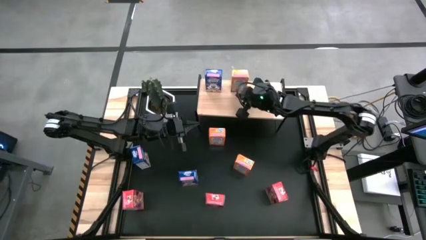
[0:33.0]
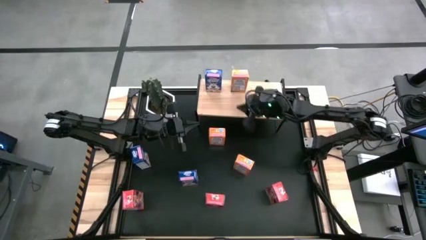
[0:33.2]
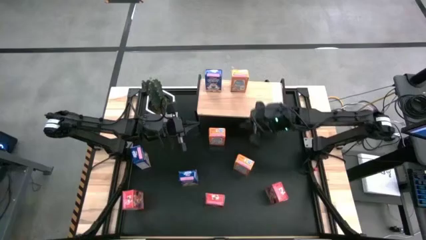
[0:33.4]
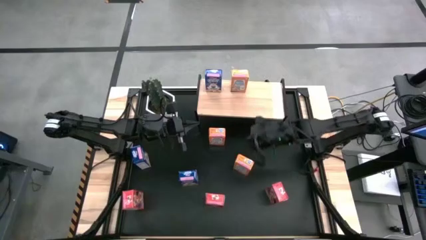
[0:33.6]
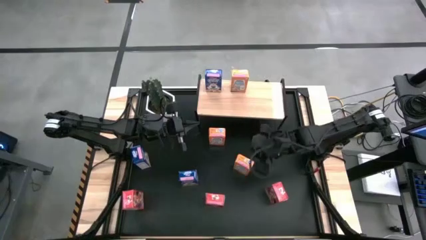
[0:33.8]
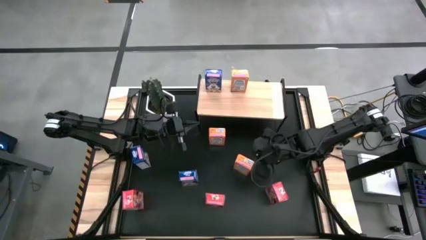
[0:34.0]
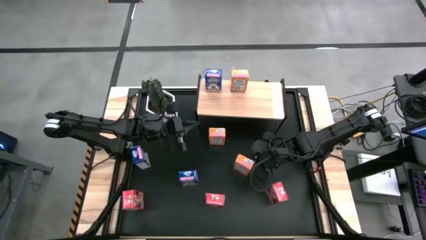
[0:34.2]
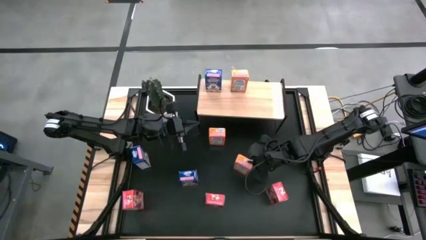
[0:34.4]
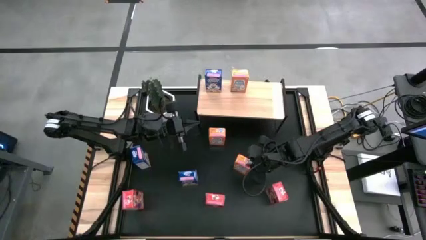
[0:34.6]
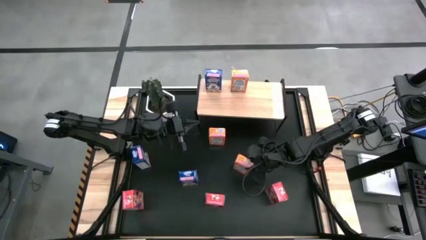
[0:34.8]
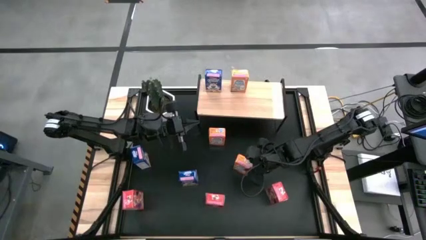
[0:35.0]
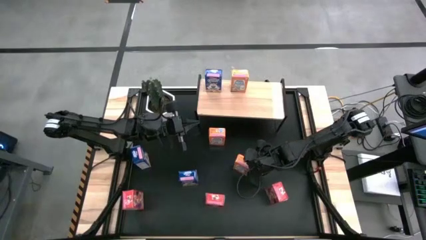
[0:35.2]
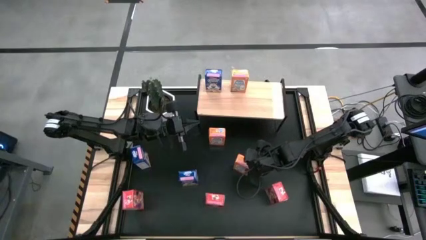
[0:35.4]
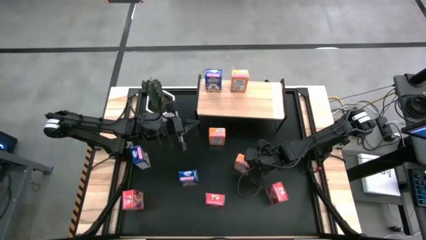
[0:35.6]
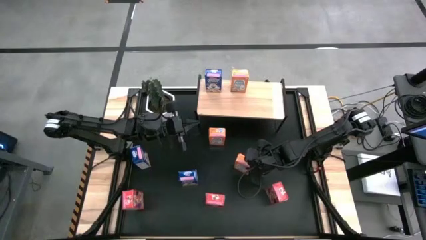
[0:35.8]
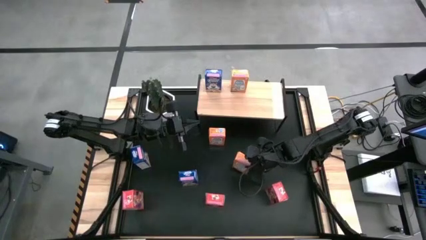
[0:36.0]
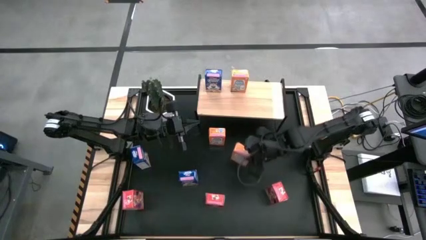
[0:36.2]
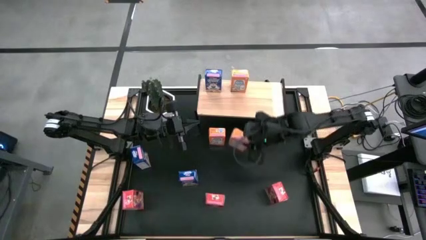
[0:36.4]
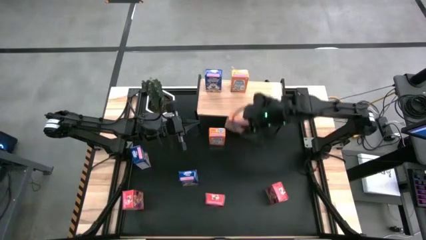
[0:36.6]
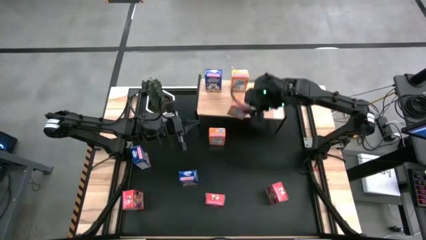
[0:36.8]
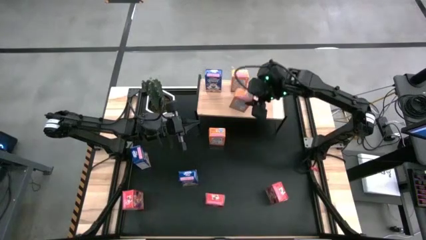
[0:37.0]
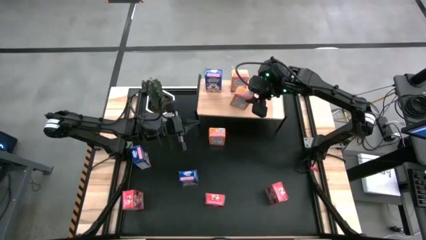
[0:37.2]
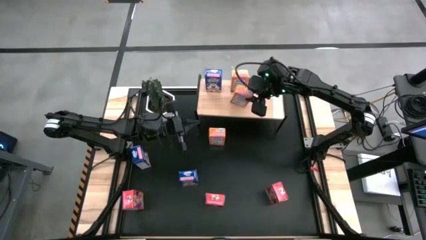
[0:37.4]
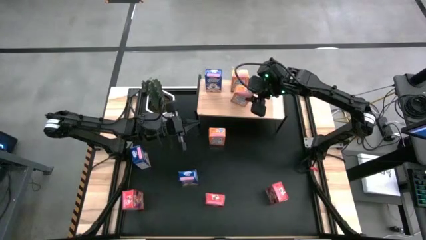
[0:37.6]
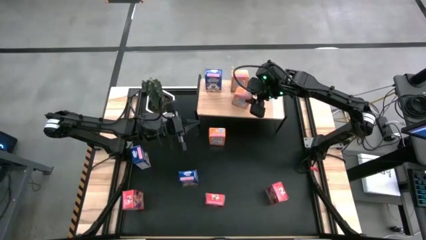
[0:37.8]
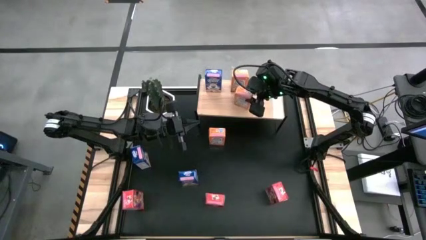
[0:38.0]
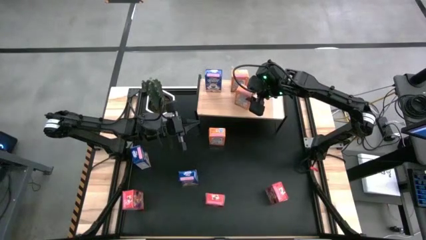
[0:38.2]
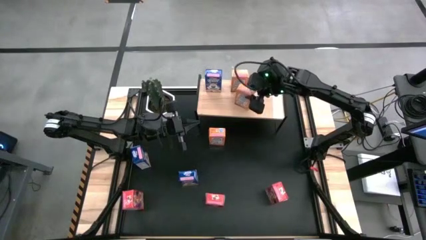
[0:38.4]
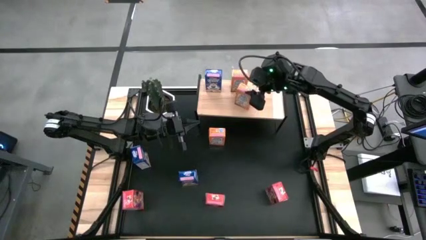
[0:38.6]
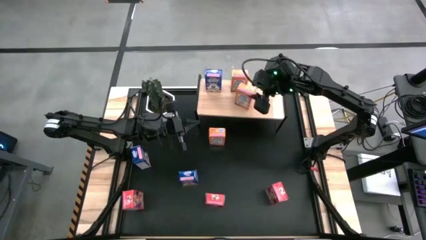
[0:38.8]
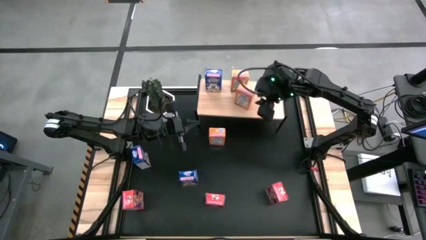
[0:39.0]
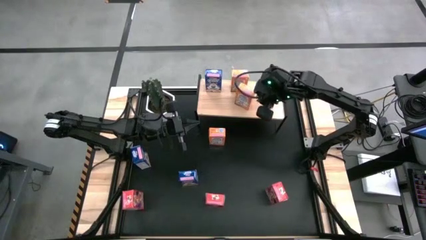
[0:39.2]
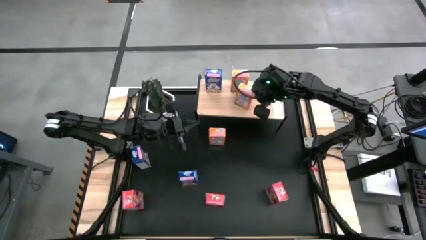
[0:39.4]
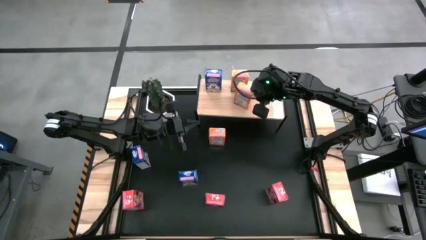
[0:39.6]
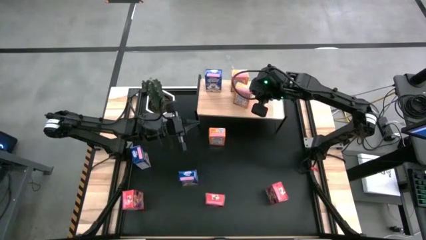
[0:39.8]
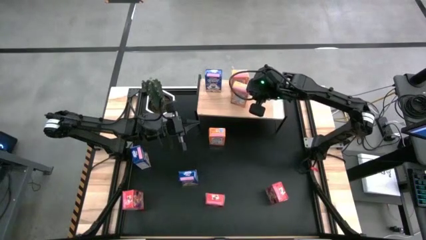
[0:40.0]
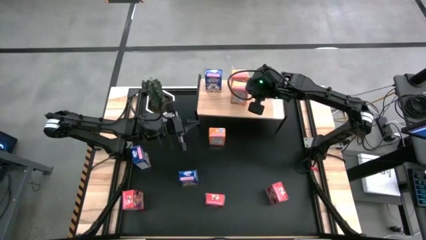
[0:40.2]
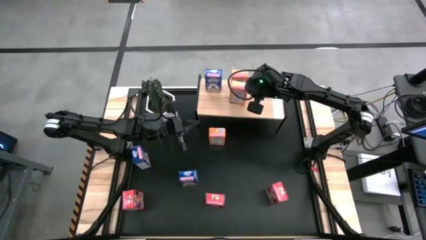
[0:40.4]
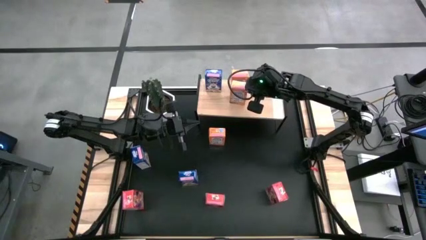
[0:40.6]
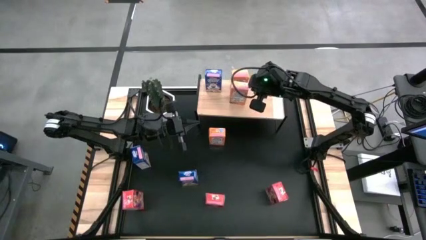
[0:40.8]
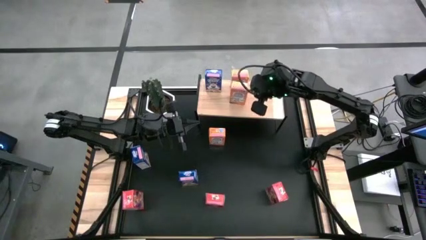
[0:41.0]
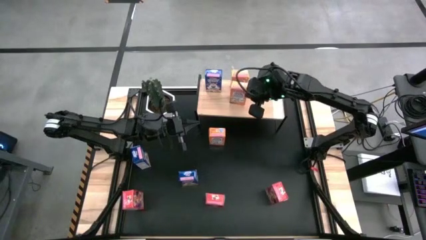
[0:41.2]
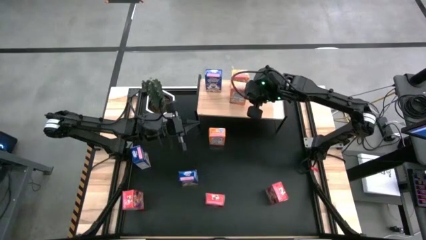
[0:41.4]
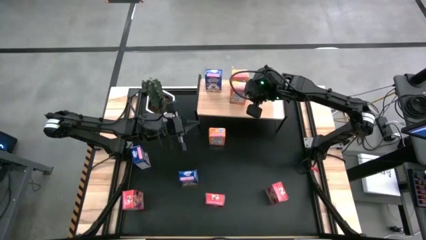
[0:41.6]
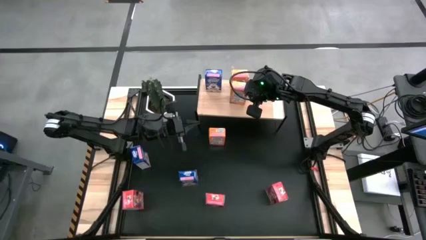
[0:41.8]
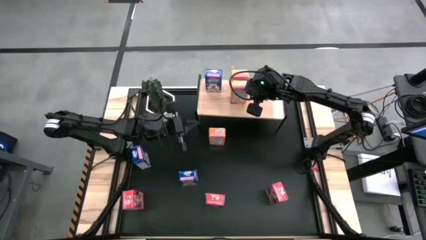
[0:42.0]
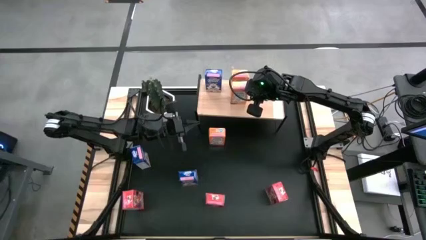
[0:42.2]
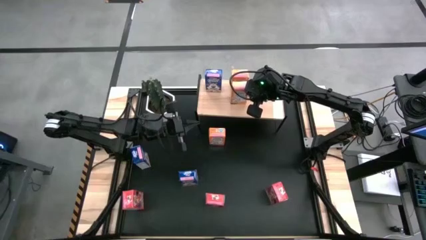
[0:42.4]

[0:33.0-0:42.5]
Task: Stack cereal on shelf
Put the bottom orange cereal box on the shelf

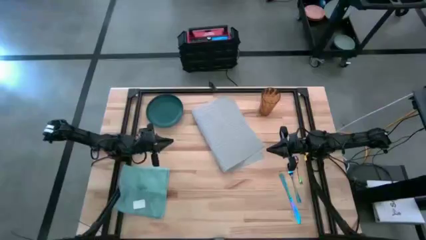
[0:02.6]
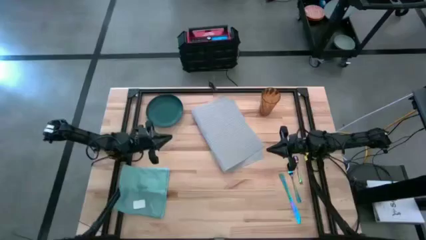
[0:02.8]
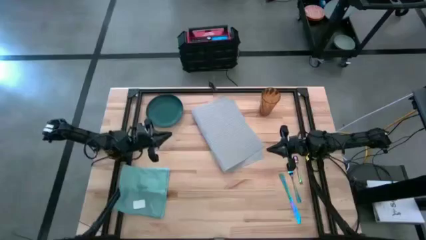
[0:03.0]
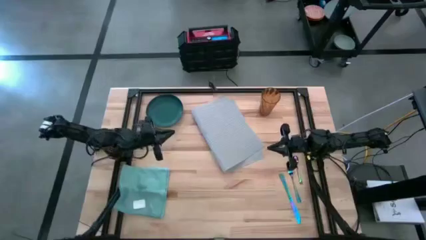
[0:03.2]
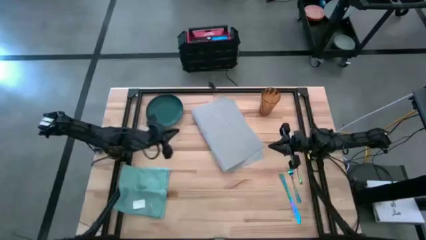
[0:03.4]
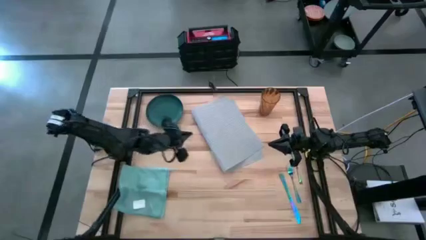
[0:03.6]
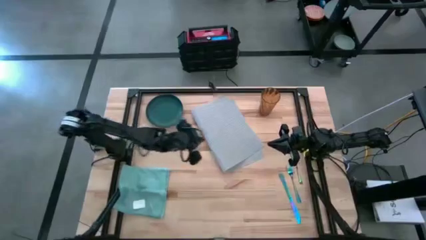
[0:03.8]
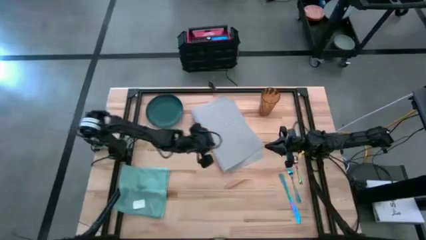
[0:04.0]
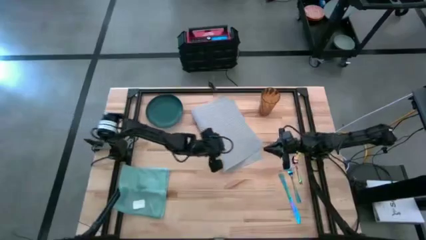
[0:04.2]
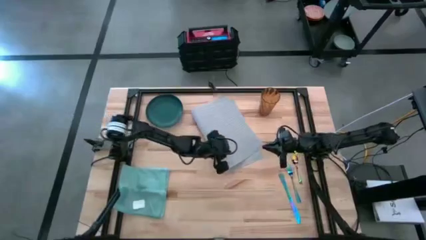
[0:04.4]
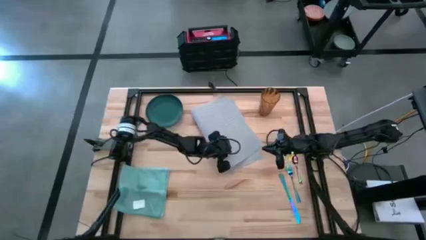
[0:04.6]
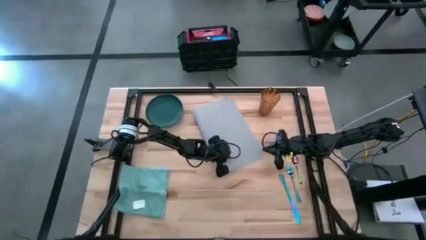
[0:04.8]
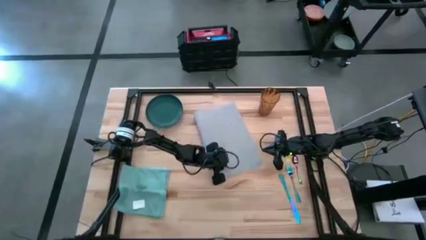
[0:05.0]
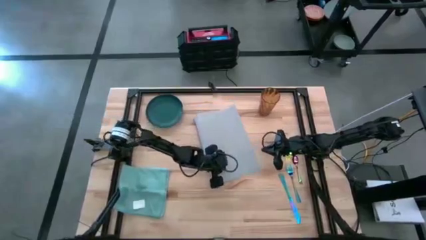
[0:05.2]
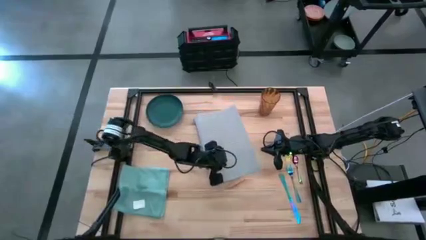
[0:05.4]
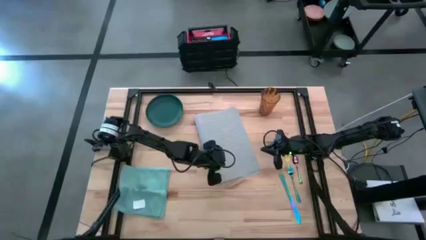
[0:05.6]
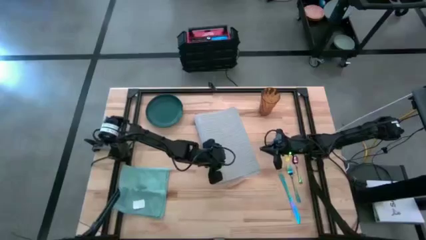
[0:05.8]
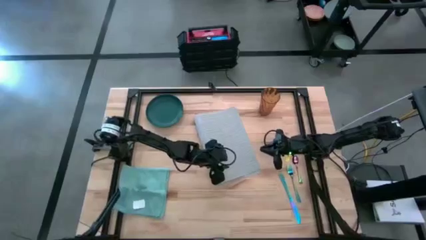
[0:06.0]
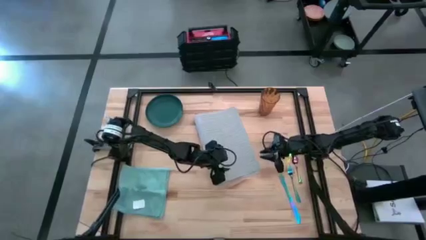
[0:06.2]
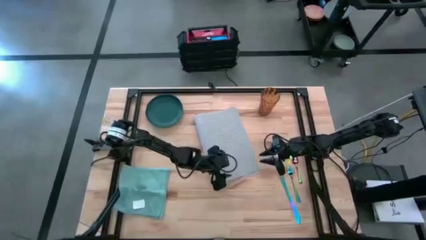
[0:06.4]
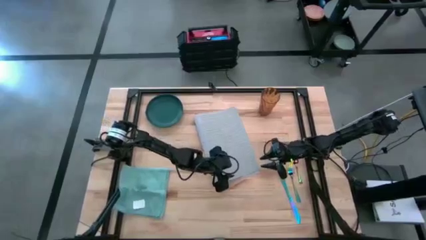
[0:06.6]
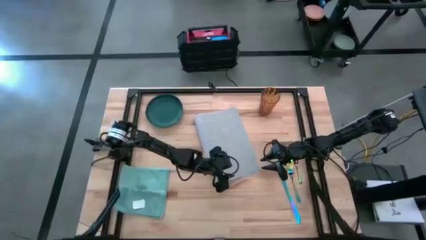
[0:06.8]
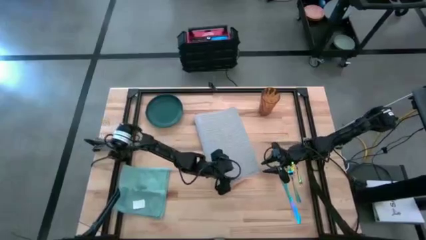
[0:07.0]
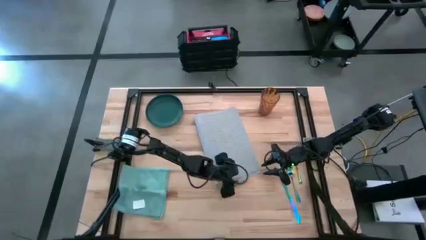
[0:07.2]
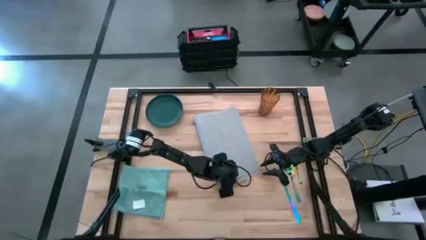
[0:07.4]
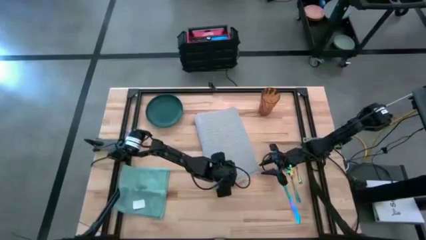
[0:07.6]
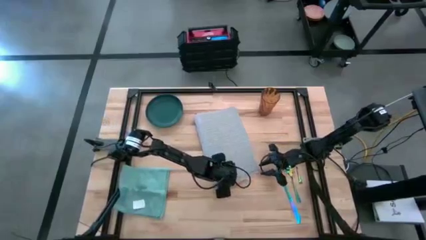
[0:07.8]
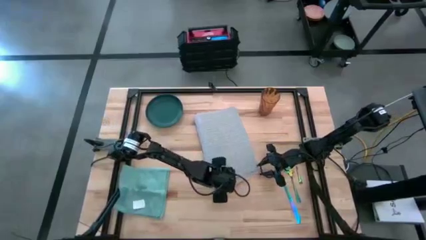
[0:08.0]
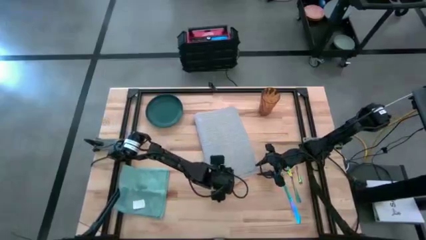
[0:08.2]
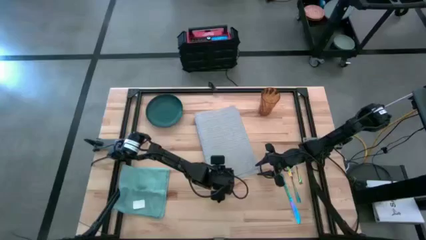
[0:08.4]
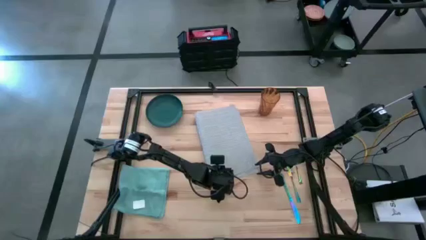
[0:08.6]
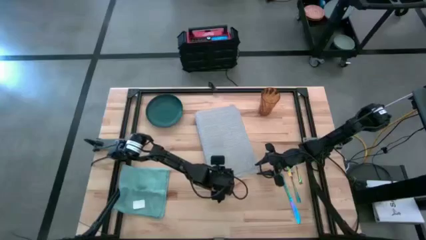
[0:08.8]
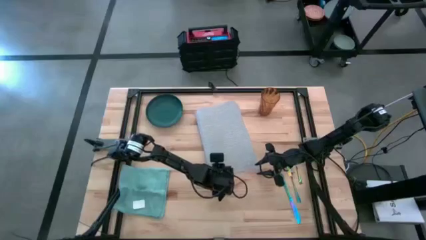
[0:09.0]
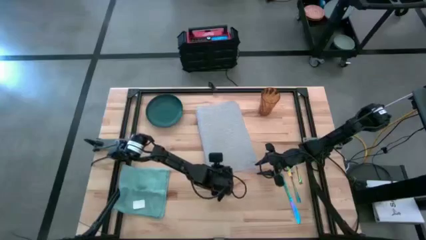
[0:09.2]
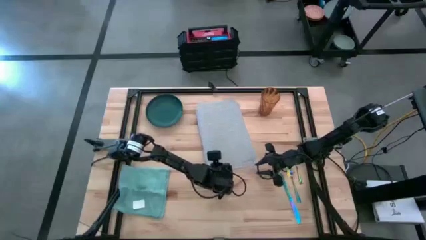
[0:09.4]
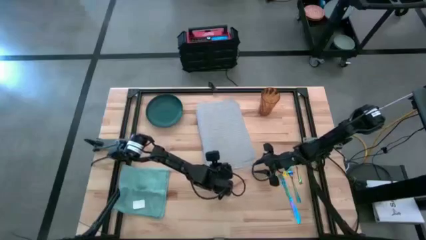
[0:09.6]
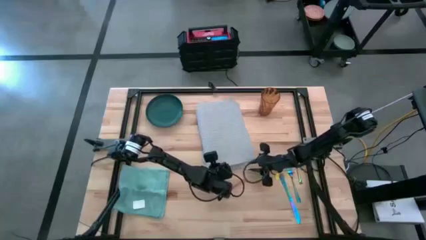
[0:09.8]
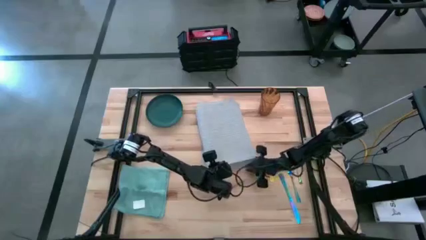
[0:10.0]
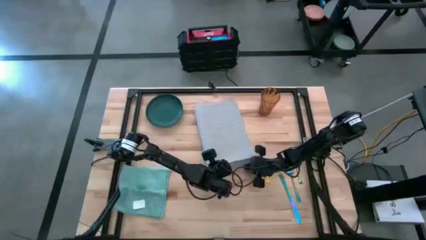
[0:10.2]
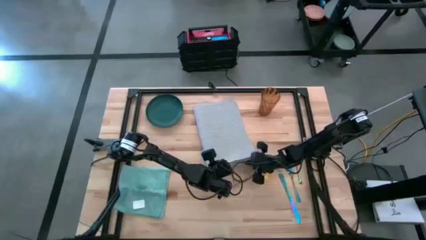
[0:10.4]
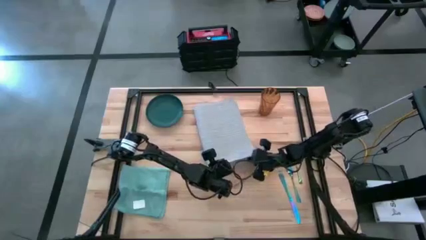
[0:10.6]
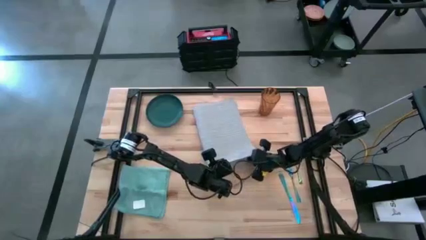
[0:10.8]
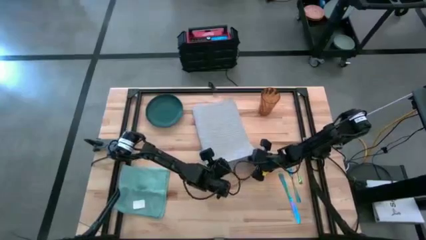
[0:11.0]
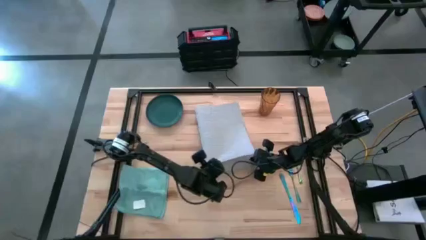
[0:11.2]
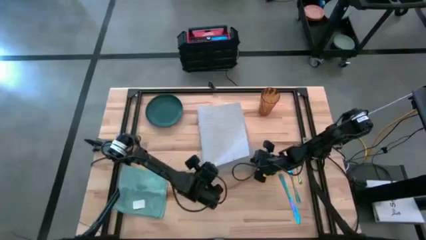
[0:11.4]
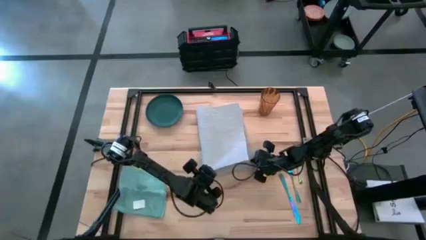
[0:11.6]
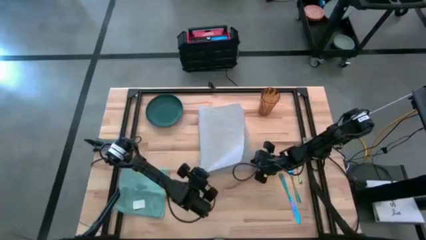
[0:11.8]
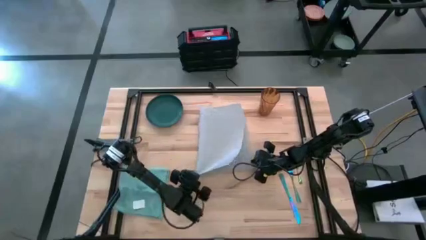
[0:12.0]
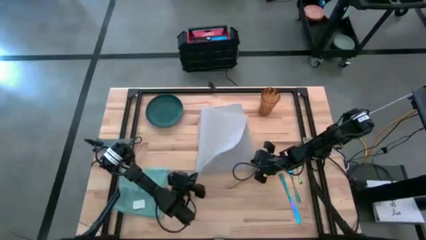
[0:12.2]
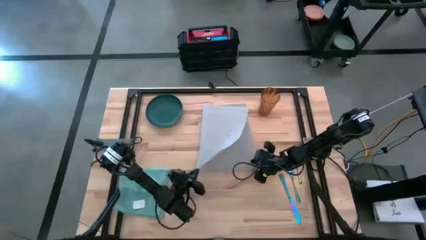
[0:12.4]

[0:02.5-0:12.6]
Task: Set table place
Move the gray tablemat to the center of the table
